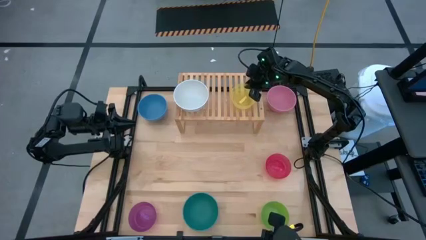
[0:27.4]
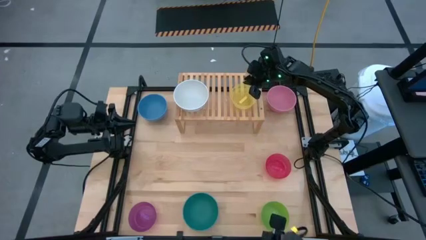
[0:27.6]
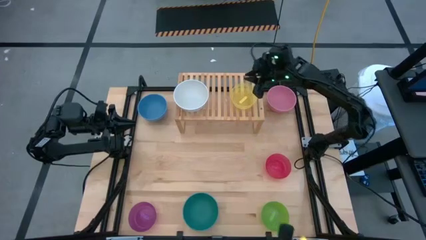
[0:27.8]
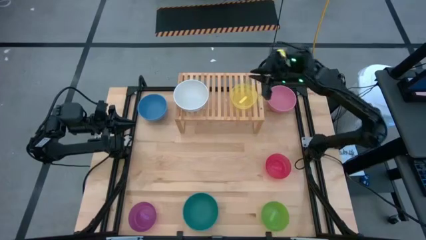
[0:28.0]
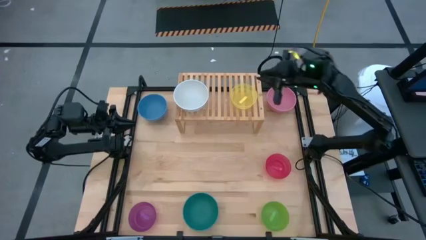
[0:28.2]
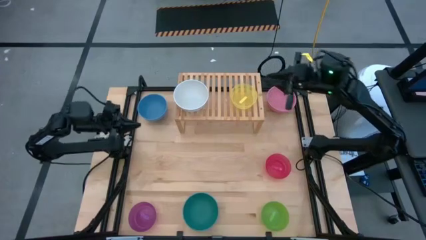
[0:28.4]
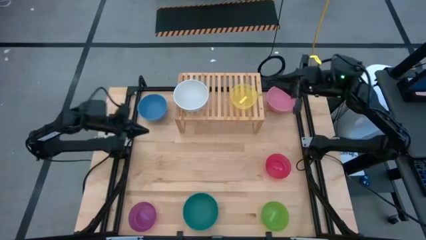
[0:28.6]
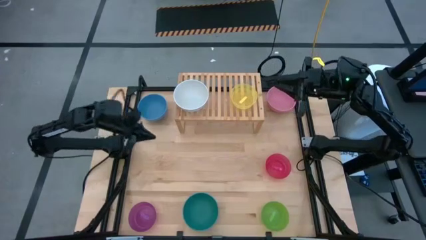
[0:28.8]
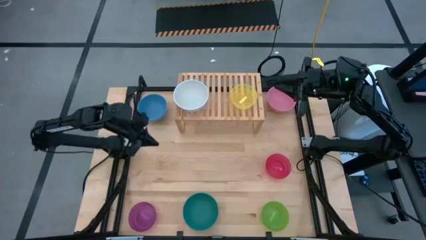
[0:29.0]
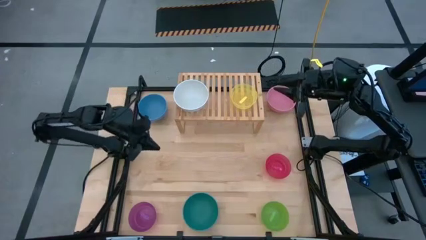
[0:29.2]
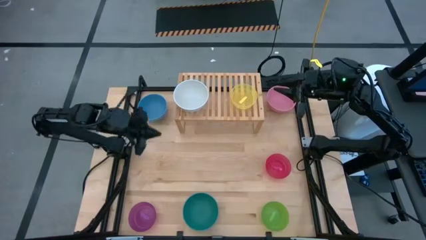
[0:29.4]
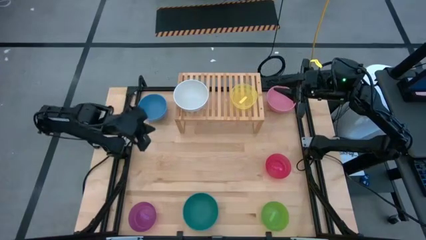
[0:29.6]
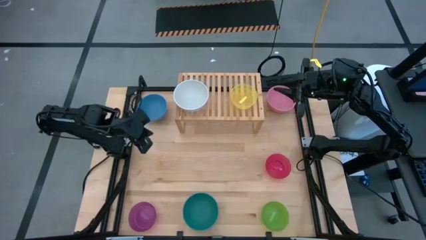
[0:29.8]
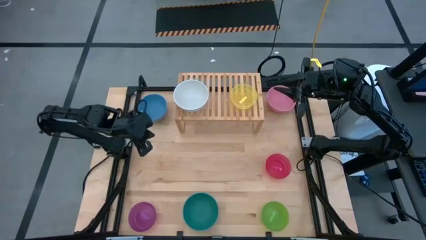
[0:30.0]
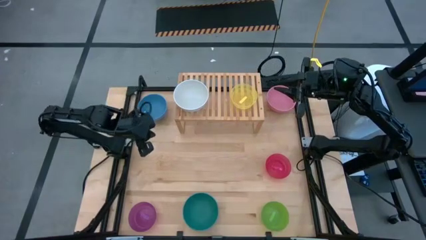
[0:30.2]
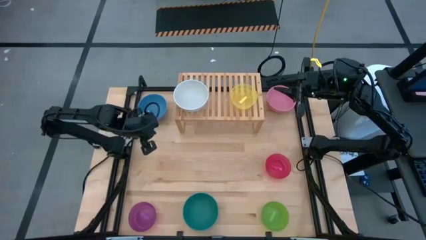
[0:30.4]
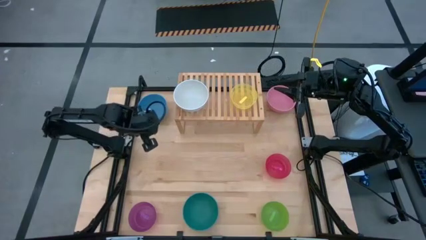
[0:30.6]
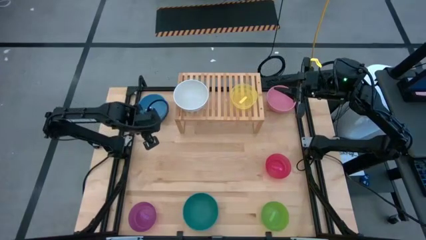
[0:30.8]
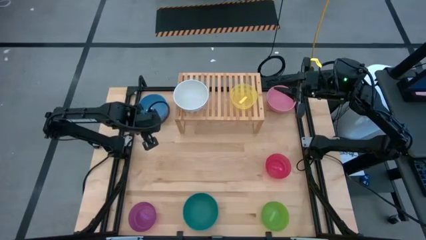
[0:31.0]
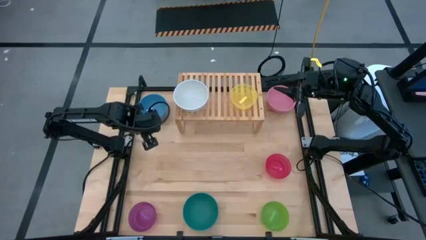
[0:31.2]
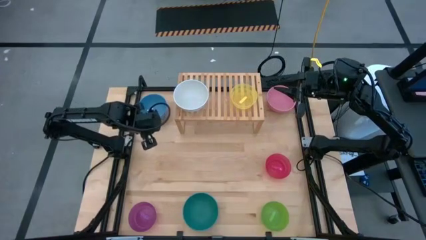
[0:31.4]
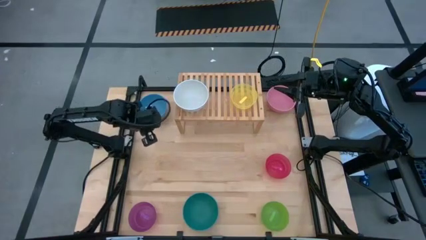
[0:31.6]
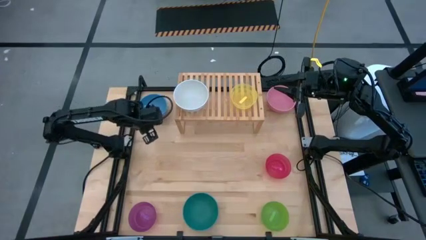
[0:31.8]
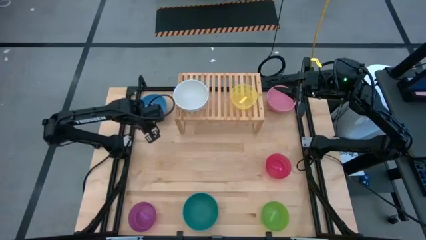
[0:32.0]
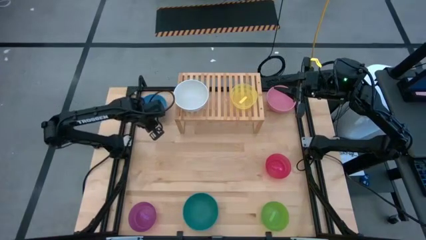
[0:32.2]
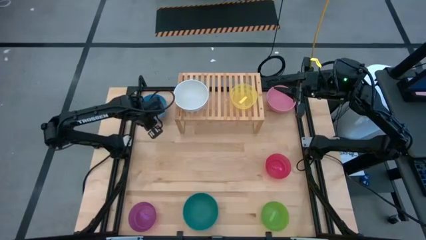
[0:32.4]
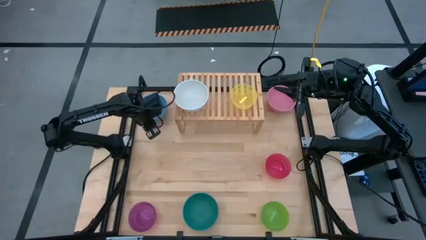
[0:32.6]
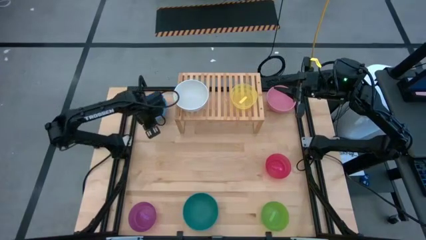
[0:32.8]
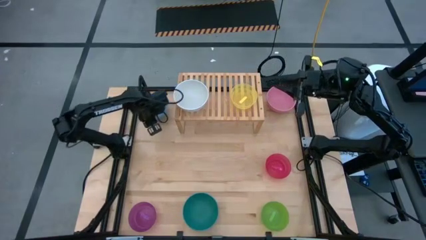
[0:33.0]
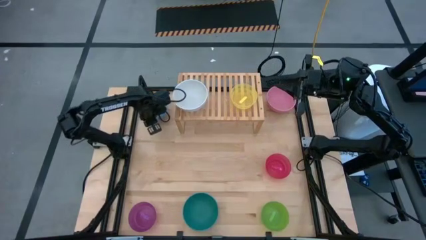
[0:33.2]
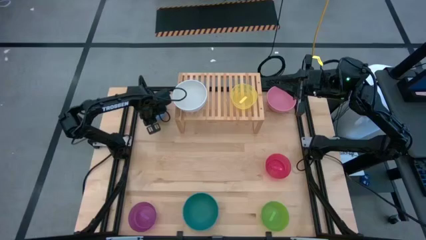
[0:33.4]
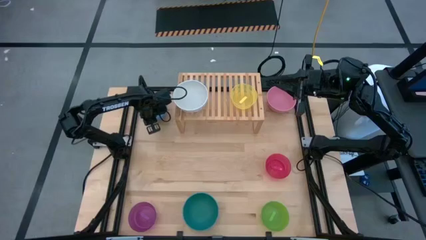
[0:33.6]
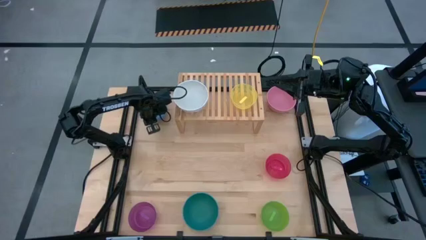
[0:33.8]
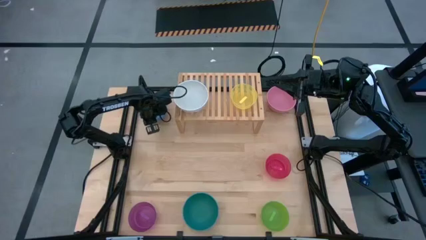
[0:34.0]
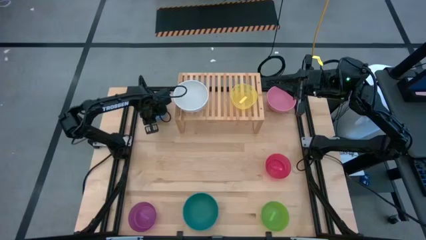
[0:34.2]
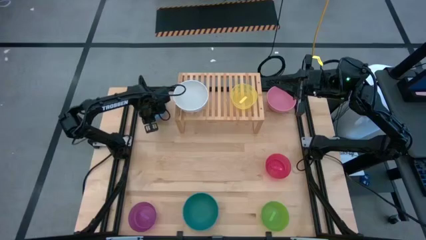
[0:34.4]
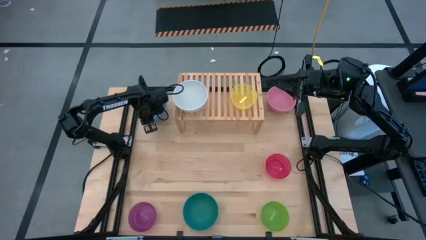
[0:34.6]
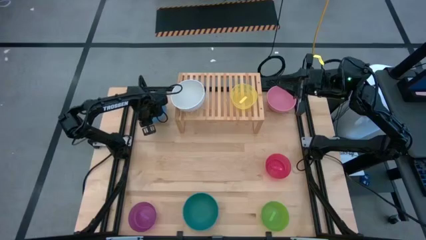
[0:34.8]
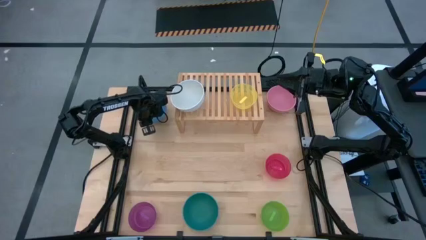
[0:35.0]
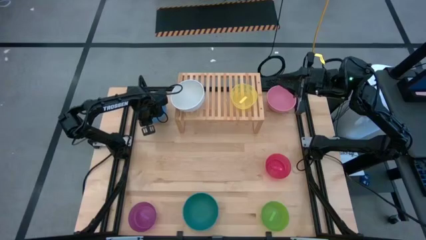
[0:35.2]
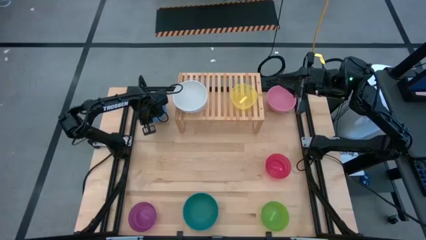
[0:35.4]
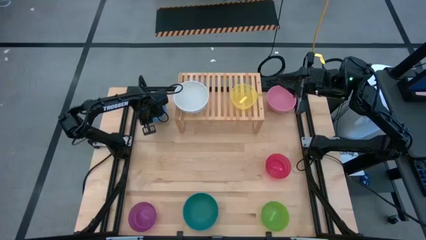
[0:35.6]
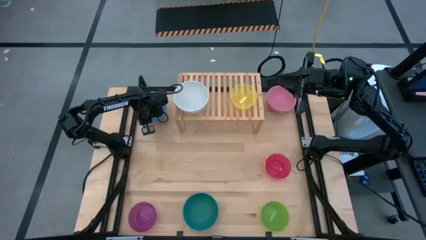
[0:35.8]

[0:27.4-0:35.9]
Task: Place and stack bowls onto a shelf
Stack the blue bowl on top of the white bowl on the shelf

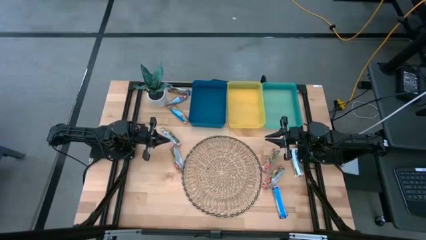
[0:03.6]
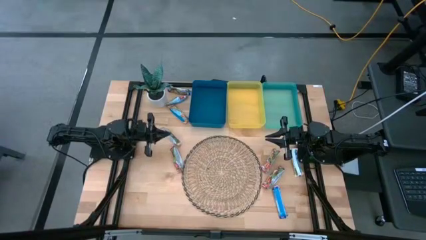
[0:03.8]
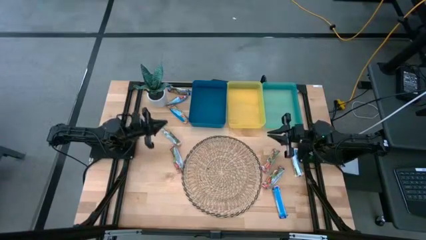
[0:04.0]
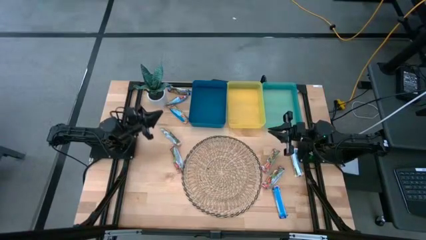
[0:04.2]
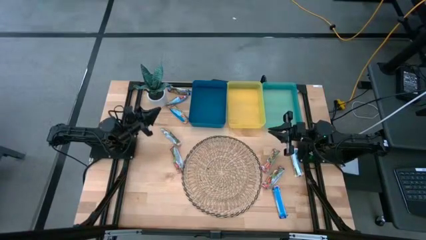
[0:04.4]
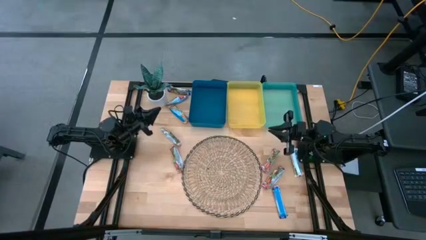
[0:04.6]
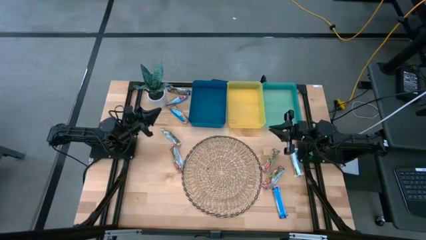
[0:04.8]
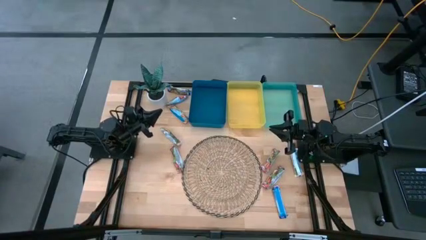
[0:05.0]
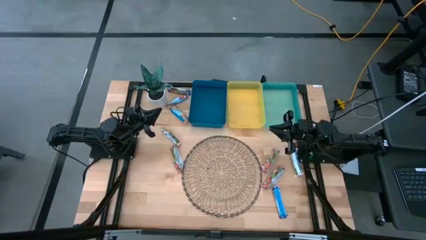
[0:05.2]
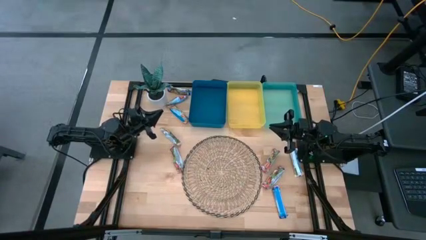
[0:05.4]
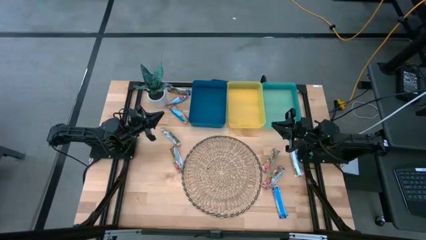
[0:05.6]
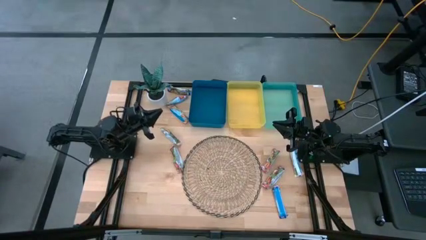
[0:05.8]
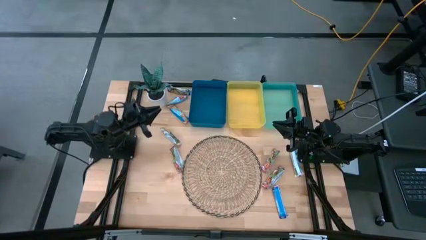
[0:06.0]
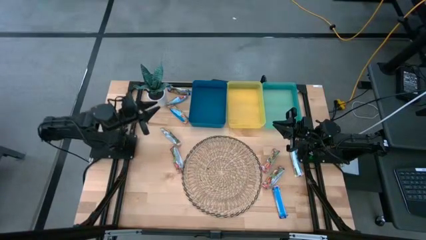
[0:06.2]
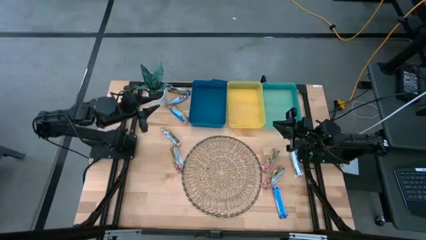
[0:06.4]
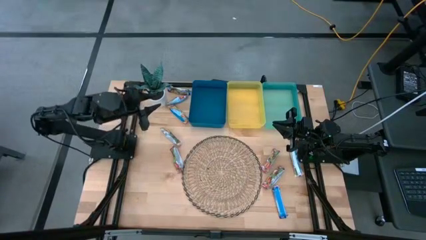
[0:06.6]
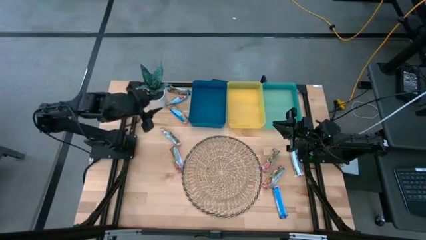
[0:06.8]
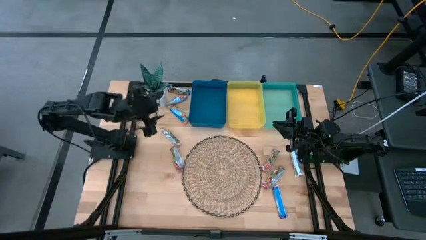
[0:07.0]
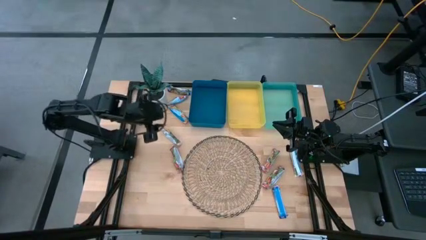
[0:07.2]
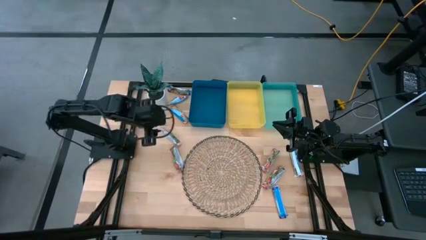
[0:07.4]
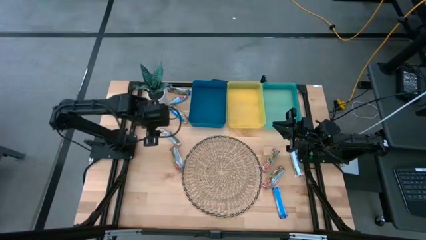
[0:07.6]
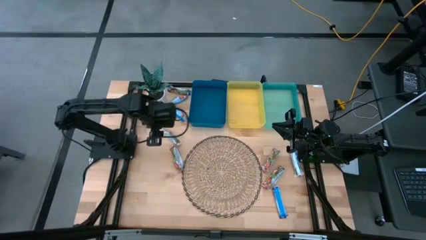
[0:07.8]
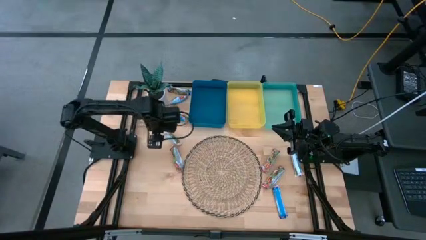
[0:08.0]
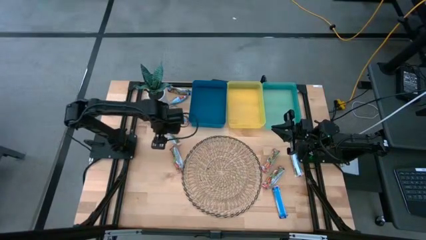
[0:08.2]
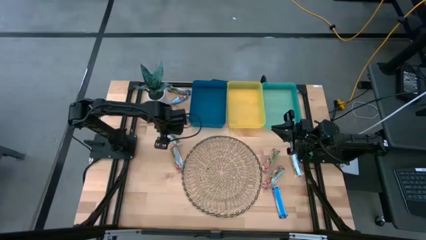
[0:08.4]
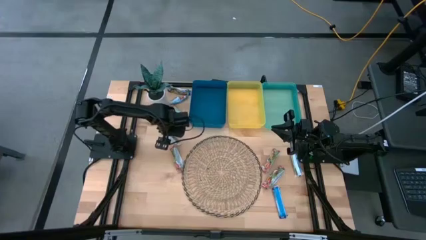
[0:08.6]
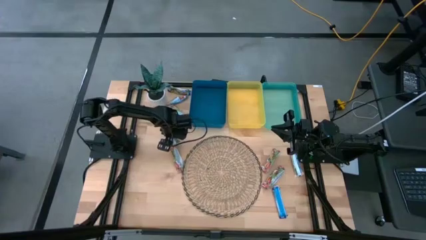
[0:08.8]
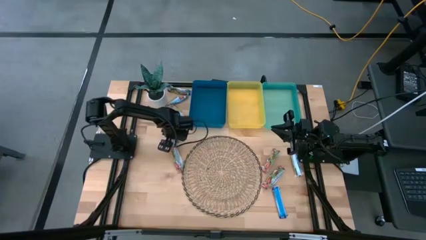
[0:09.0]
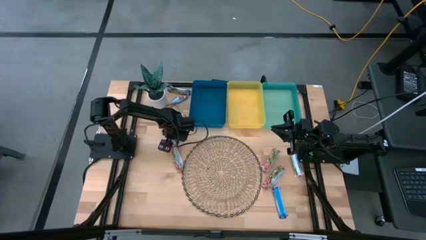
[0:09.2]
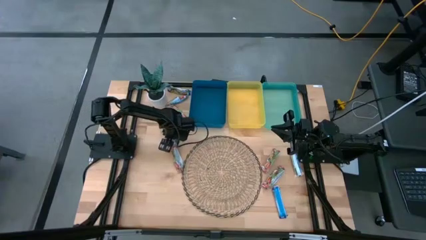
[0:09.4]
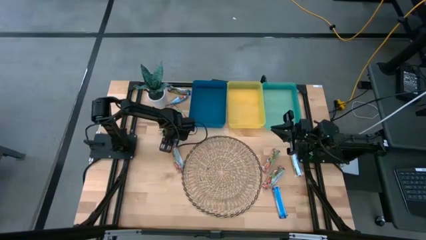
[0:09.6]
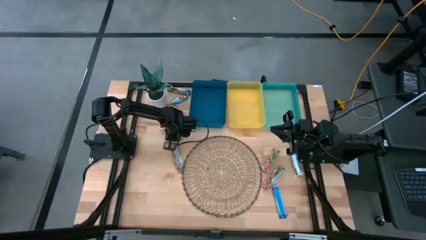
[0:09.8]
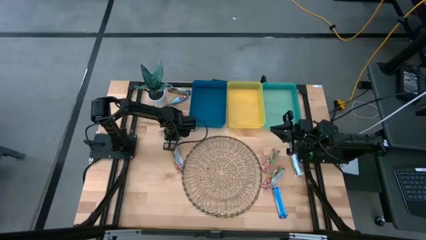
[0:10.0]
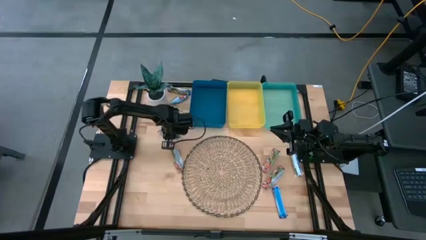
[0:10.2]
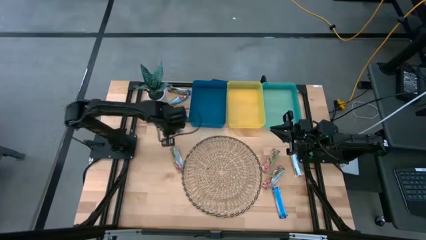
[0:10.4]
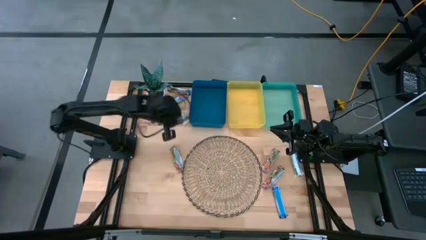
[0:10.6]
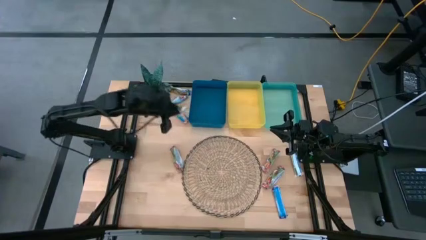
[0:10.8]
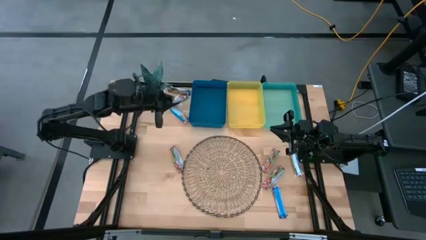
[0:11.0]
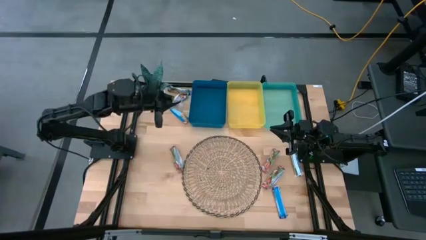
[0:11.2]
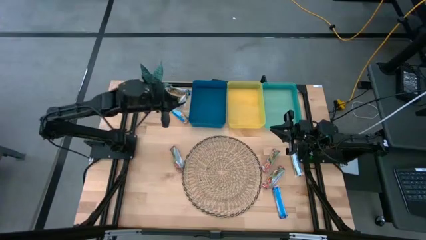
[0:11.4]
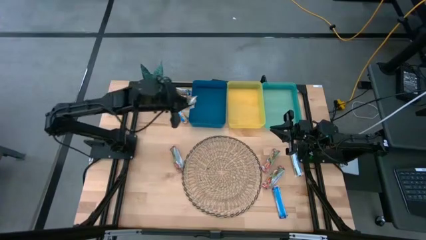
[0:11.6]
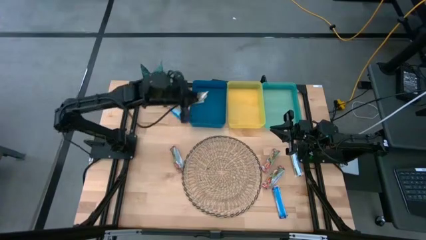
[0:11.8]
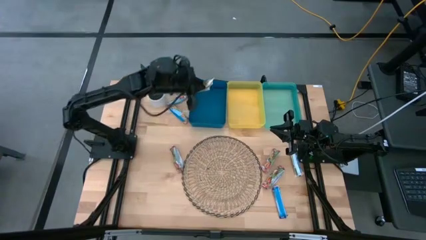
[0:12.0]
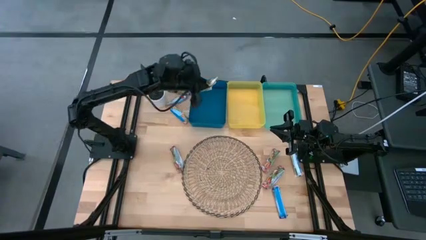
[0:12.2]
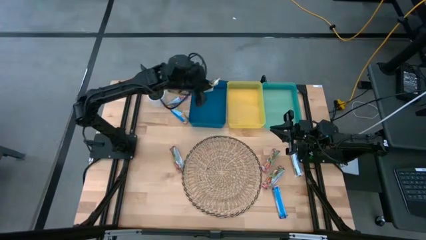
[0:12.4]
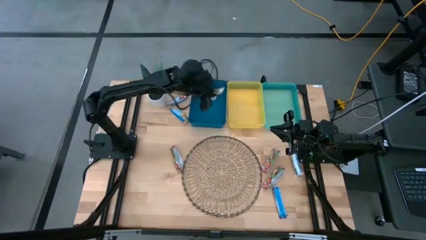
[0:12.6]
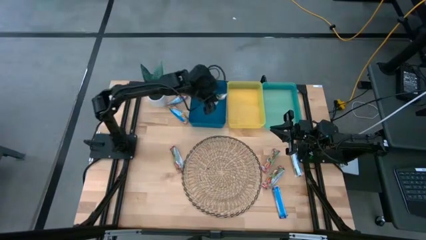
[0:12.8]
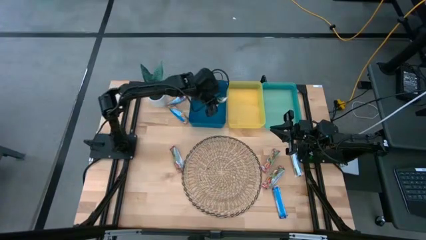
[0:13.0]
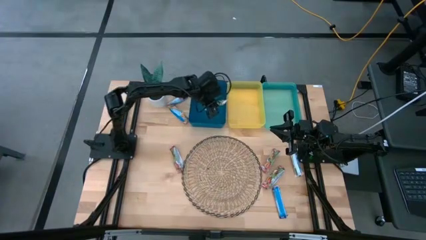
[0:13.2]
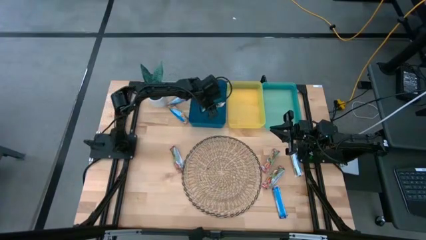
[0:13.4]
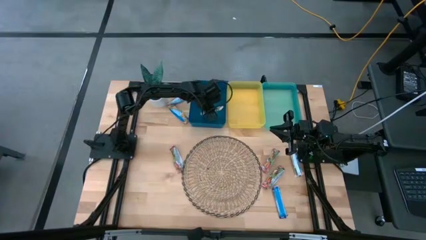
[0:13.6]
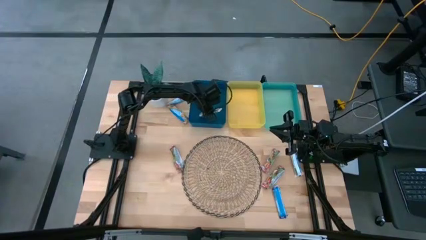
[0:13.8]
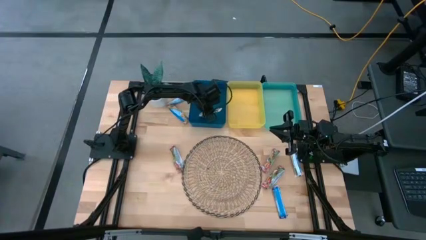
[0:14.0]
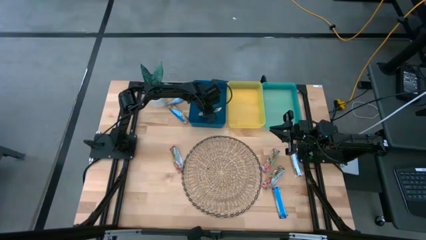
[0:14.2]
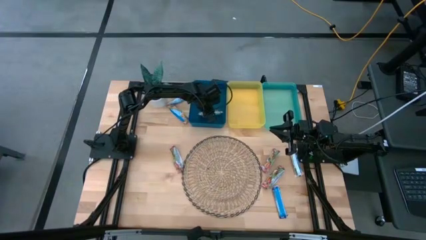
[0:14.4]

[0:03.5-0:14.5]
Task: Pick and place Granola Bars by type
Put the yellow granola bar into the blue bin
